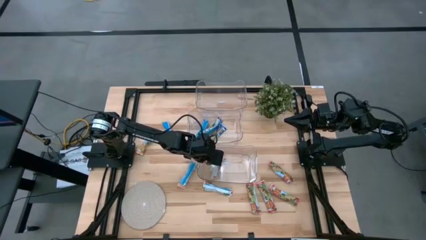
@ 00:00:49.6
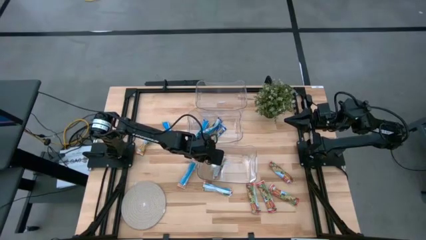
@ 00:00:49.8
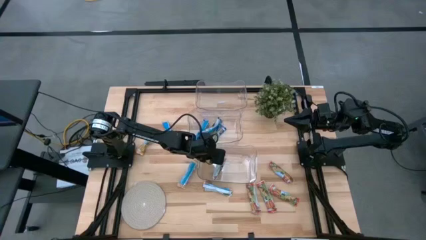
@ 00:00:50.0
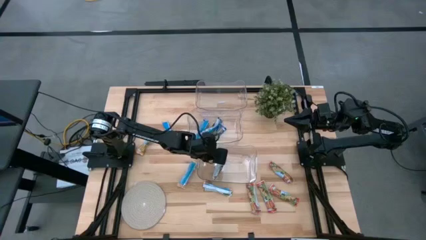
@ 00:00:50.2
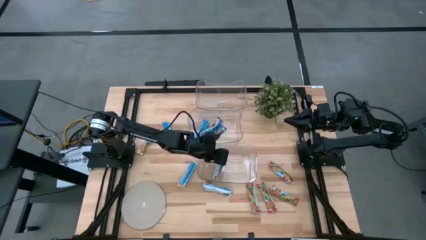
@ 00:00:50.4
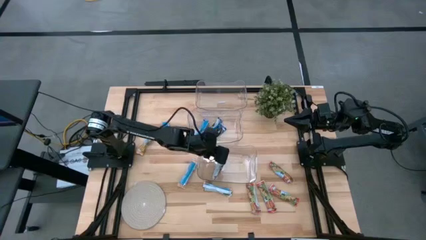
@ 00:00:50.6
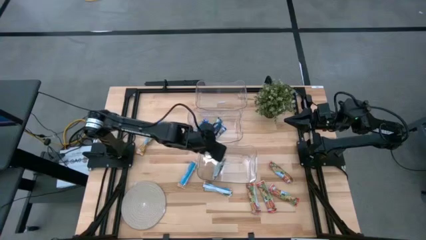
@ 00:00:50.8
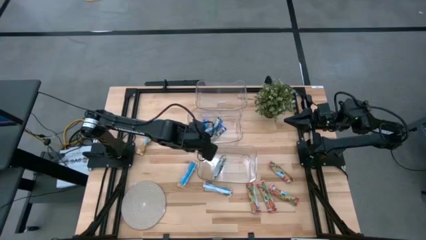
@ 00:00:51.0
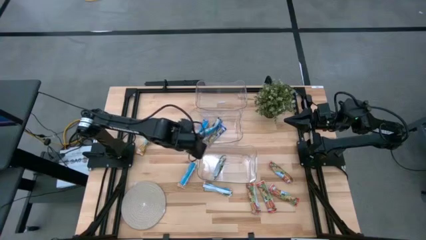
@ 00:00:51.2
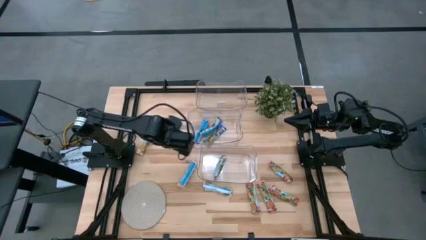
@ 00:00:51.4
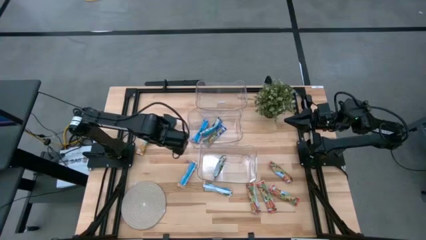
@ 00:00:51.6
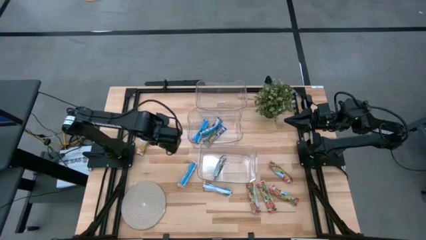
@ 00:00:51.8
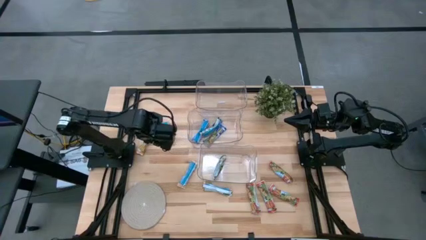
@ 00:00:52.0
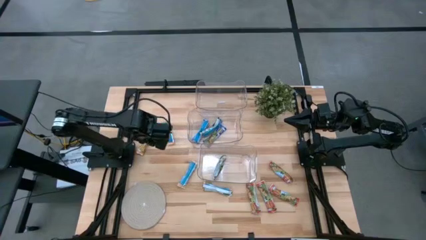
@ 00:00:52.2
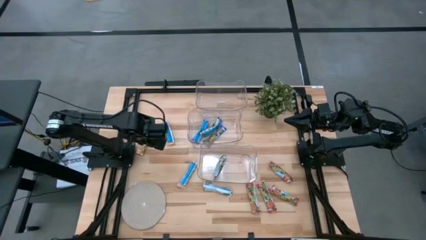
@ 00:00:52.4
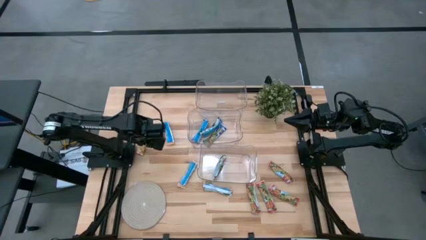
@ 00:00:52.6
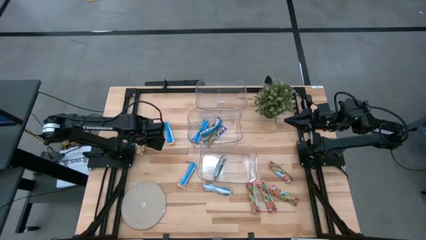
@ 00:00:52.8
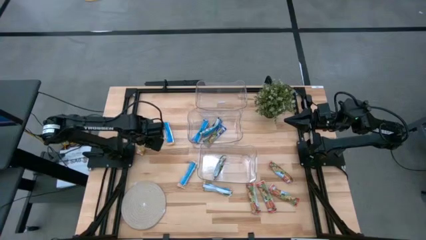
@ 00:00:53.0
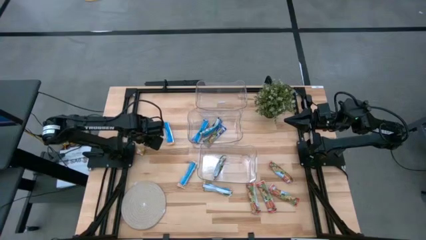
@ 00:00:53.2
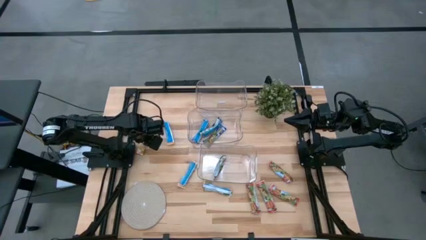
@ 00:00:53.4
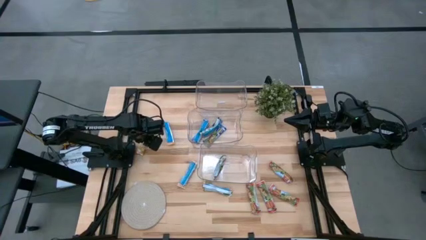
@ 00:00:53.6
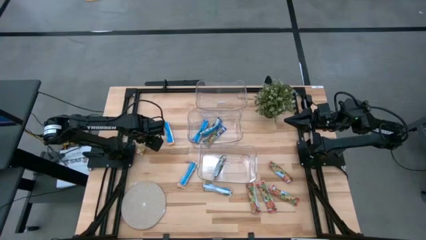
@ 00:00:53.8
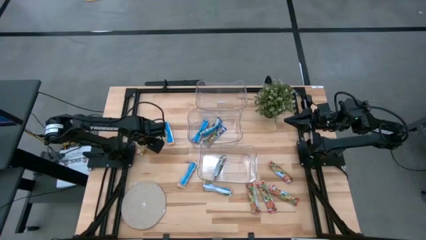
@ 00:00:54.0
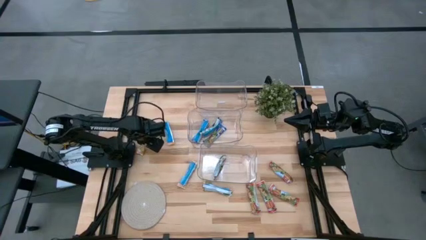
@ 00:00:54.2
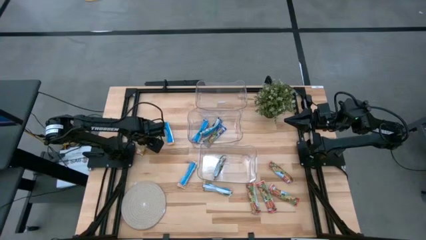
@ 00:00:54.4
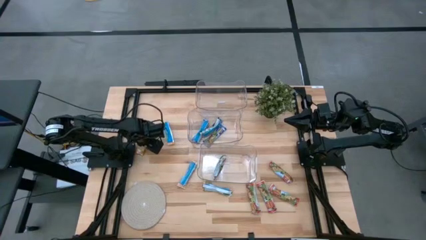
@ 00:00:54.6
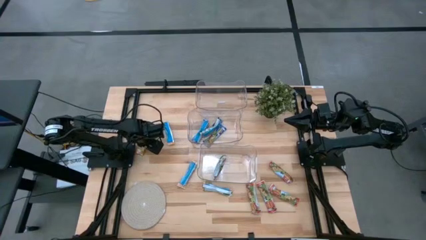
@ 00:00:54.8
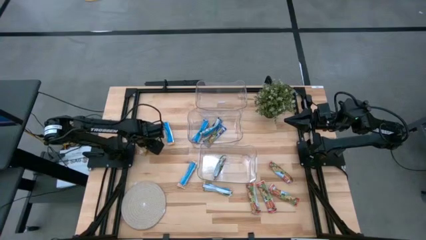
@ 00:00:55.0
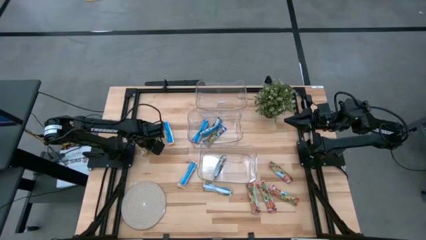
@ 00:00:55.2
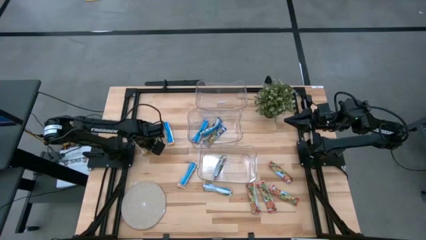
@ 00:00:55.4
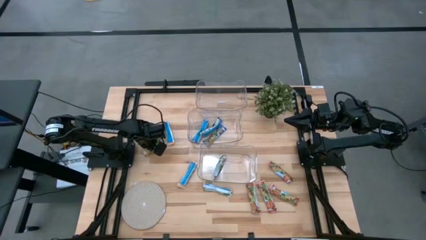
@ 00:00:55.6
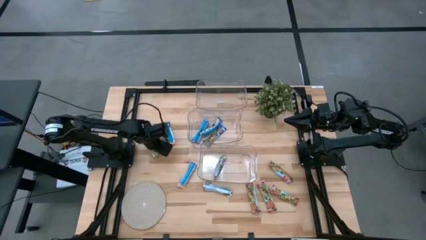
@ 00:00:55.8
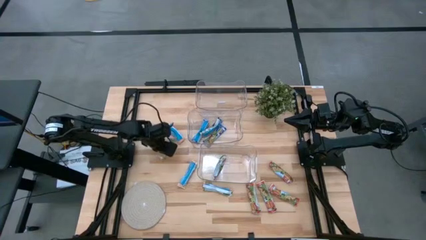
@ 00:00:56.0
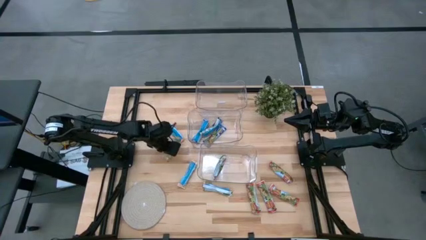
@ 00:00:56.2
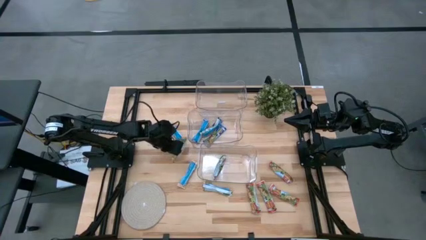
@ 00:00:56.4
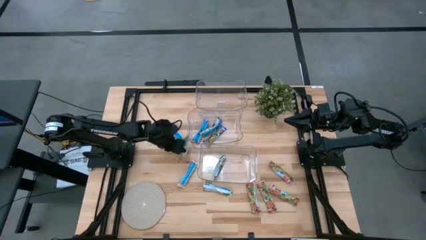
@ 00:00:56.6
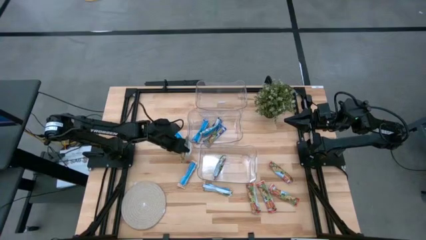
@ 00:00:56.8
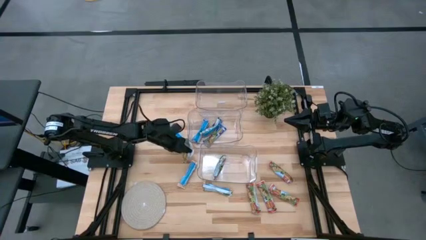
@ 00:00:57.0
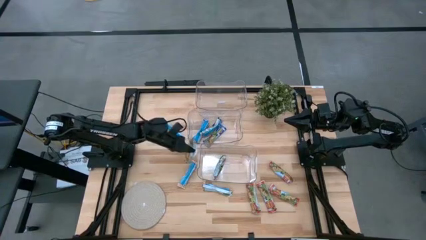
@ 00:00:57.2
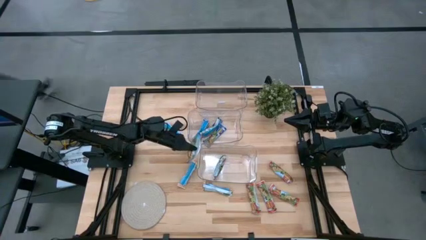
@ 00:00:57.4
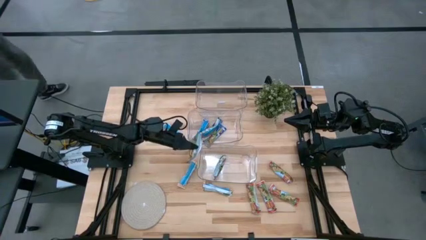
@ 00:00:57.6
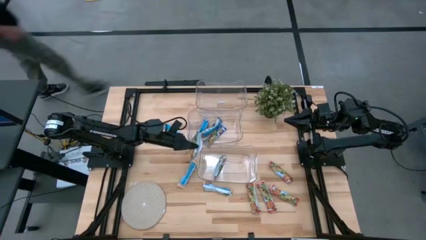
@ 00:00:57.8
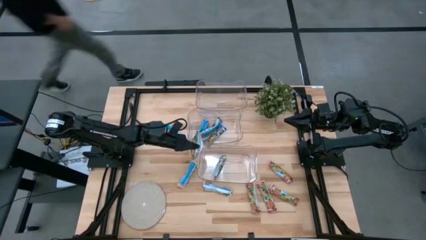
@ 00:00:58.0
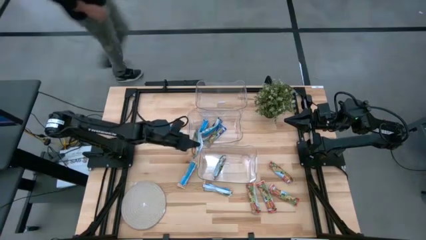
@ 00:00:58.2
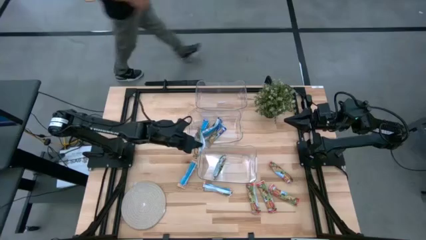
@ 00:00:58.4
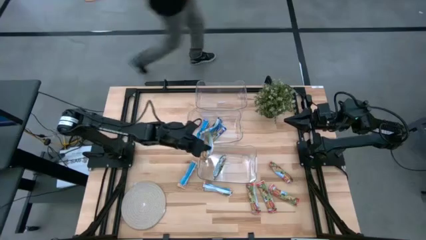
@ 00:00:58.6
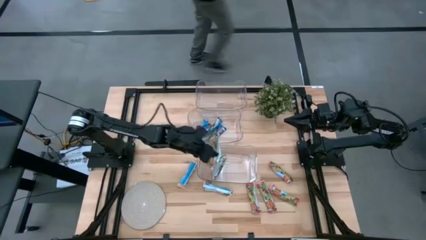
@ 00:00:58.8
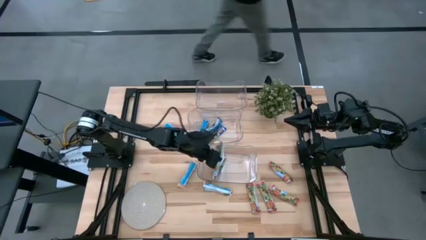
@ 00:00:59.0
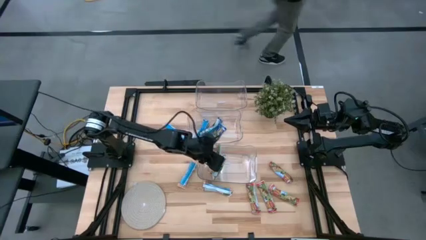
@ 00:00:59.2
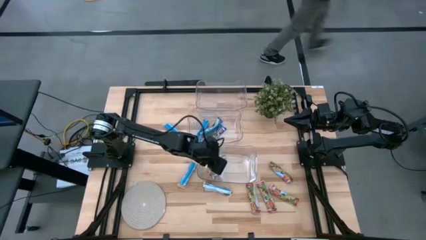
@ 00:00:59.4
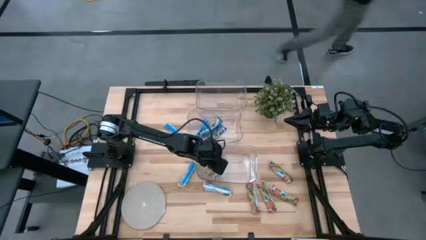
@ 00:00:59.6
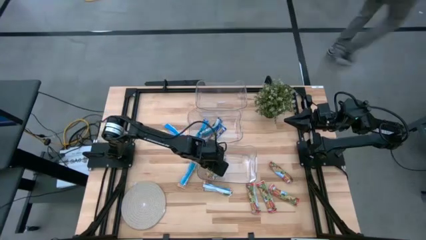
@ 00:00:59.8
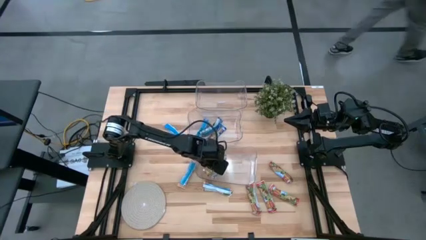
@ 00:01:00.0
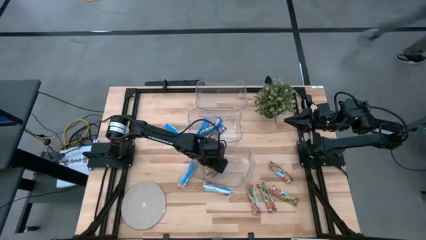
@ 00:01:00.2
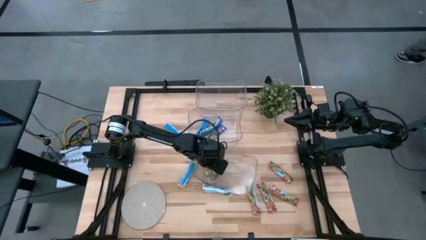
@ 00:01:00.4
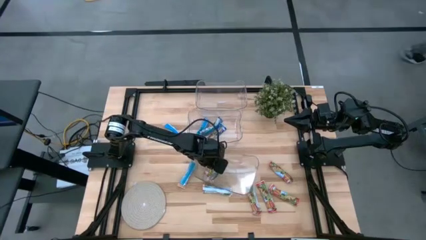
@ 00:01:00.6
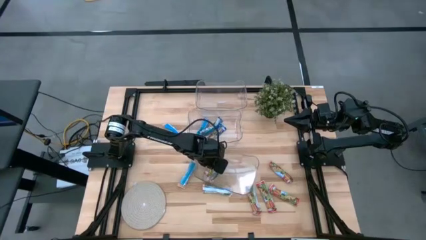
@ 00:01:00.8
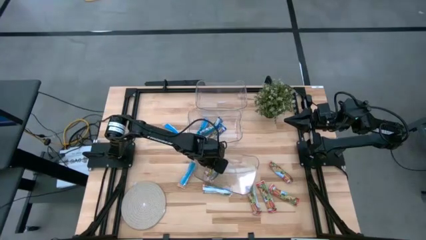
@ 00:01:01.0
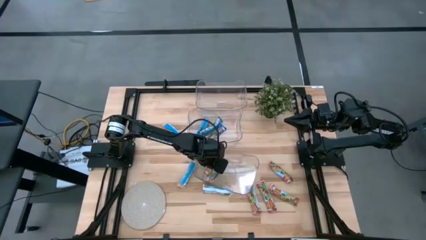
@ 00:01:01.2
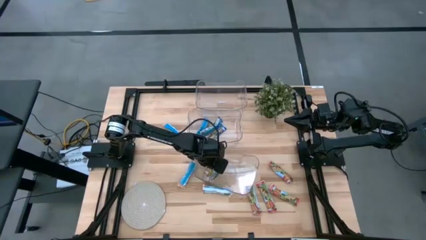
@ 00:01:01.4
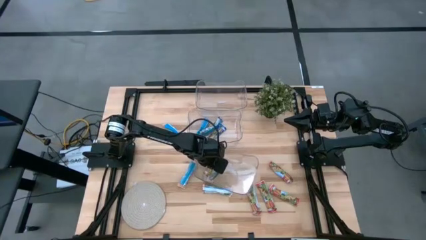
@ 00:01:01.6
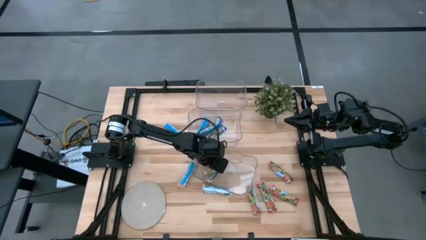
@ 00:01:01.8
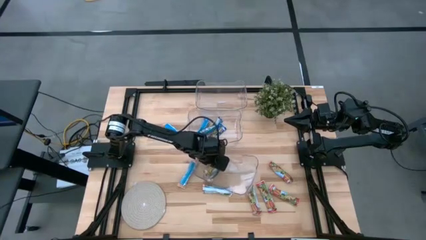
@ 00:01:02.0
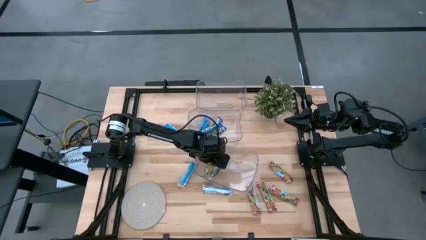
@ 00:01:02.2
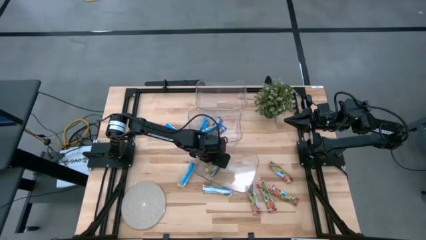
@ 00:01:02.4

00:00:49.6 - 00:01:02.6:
Task: Pick and place Granola Bars by type
Put the yellow granola bar into the bottom transparent bin

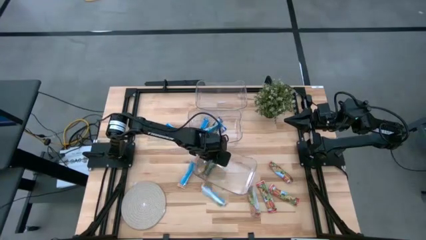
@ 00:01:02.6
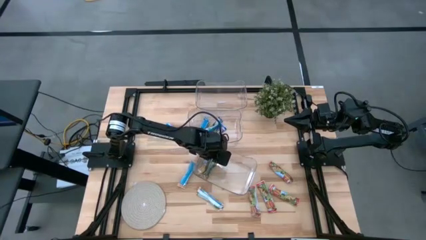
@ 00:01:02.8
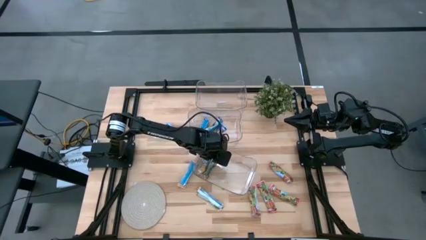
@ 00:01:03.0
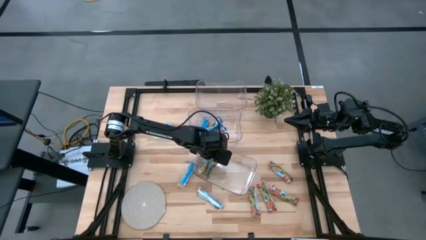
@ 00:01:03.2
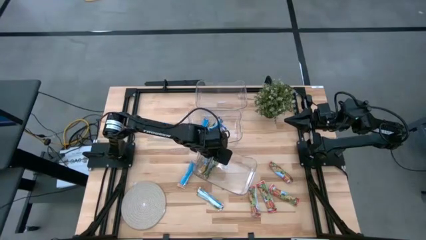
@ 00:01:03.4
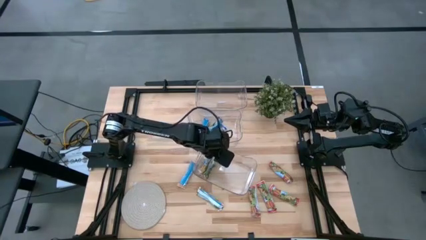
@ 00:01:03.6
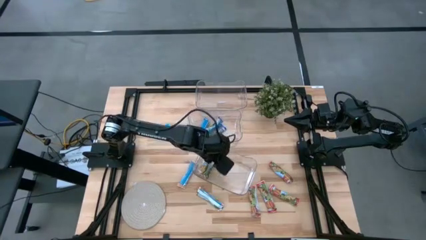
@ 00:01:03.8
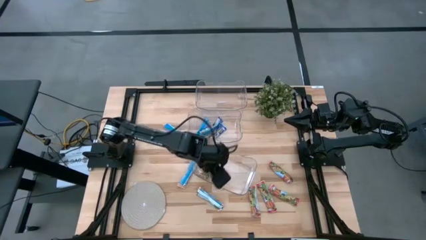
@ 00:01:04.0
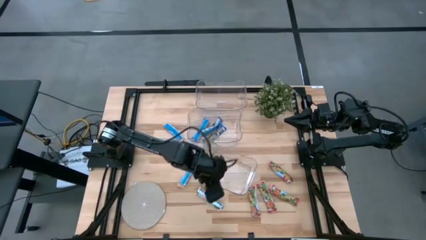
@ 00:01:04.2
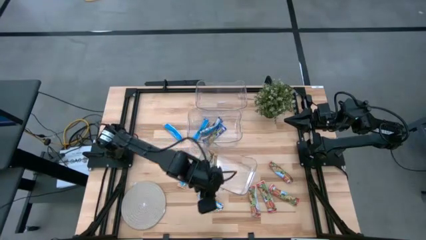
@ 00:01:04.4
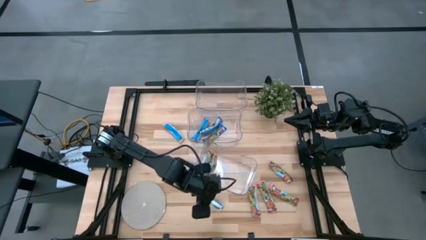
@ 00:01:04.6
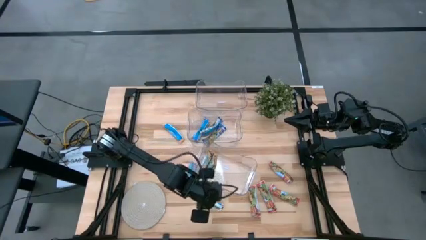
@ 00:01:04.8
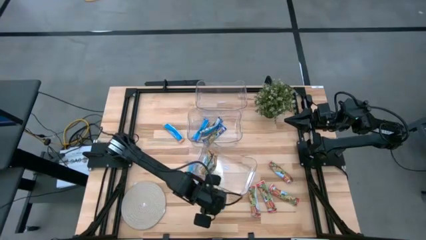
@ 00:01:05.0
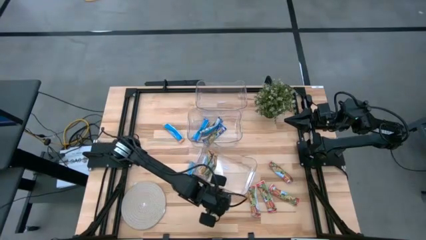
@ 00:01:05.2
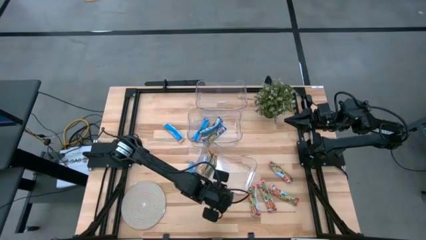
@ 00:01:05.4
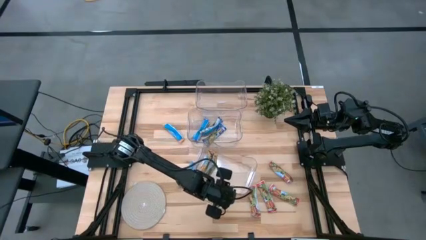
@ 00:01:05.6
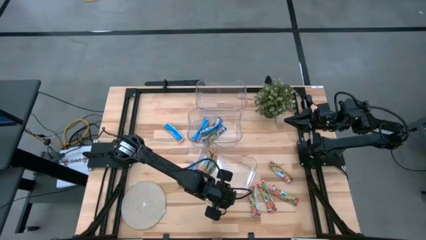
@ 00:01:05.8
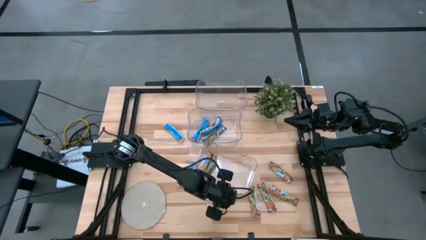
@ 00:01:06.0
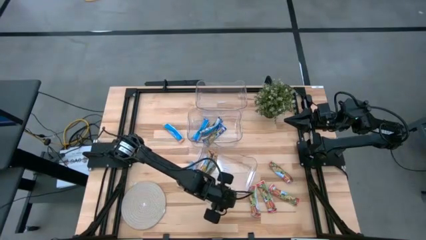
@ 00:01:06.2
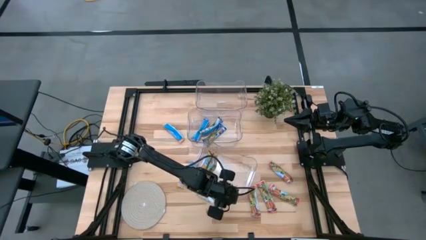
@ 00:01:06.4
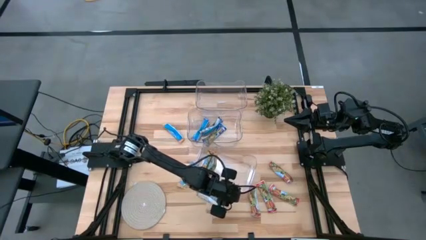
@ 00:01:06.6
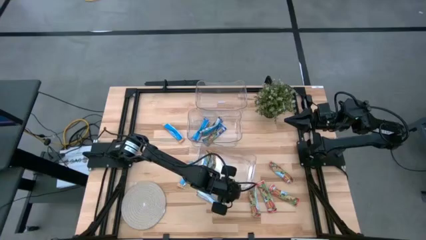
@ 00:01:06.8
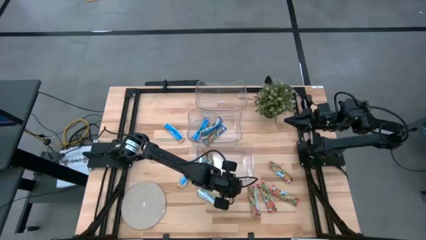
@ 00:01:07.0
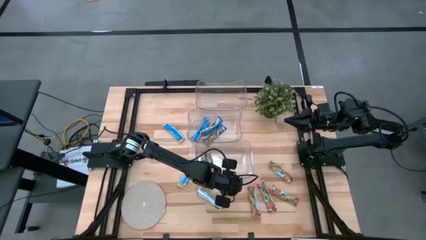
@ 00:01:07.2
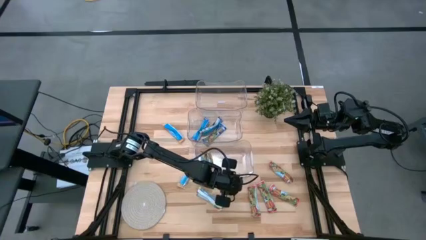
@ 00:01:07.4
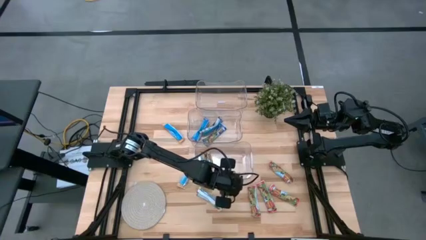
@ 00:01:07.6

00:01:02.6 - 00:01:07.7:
Adjust the bottom transparent bin
